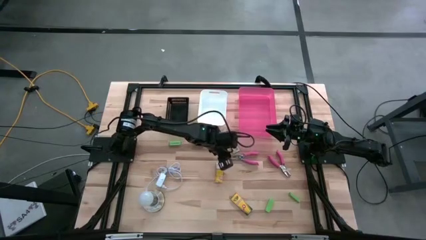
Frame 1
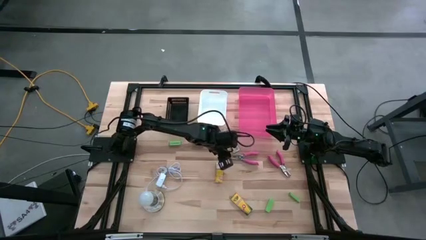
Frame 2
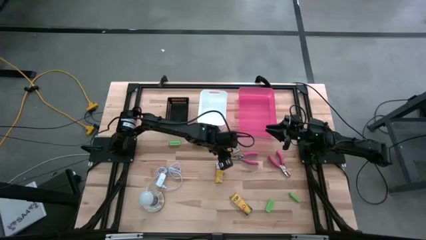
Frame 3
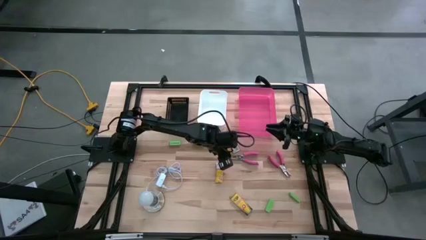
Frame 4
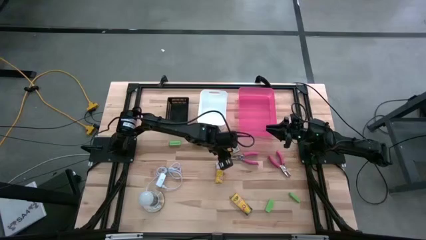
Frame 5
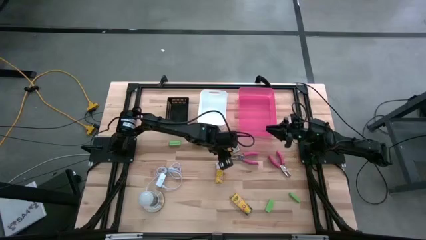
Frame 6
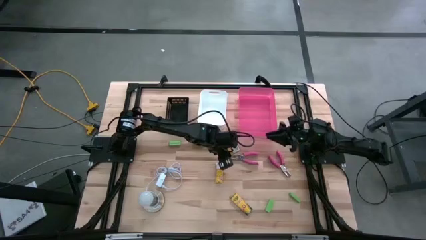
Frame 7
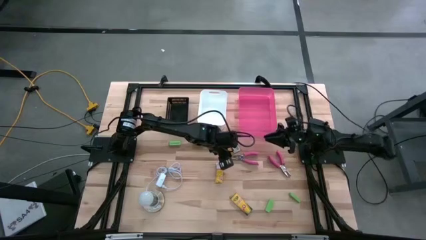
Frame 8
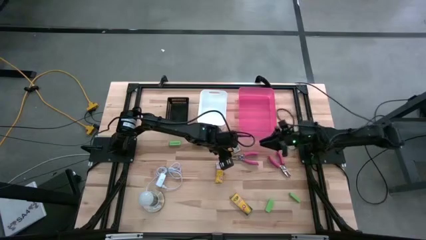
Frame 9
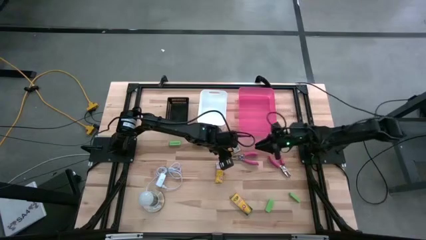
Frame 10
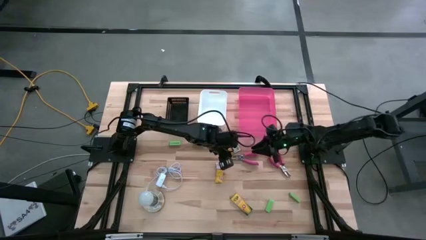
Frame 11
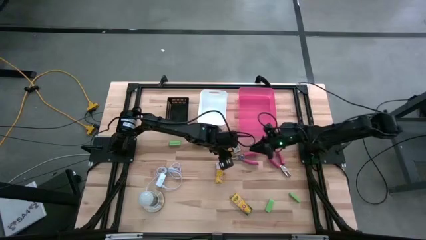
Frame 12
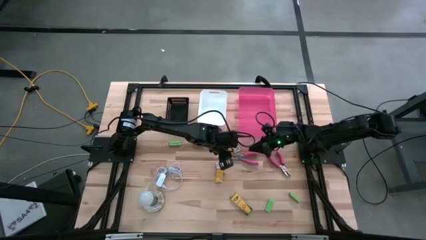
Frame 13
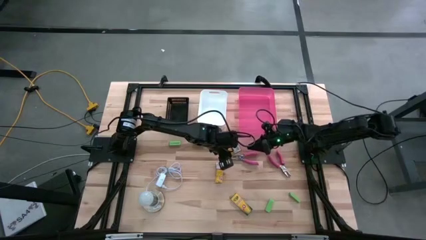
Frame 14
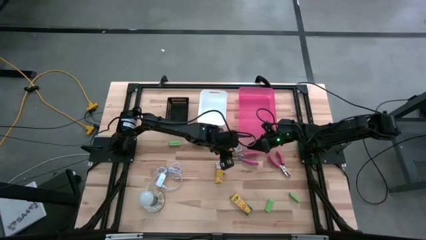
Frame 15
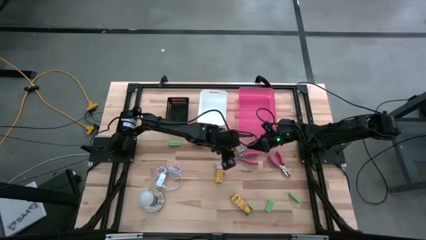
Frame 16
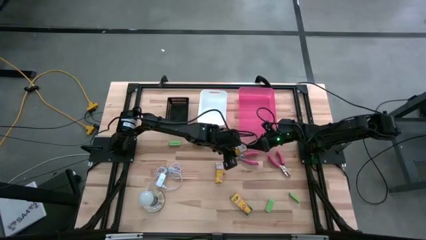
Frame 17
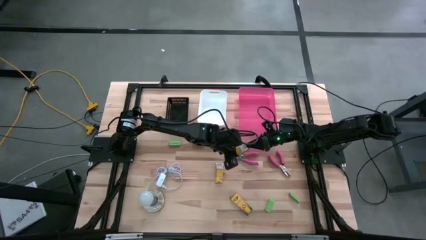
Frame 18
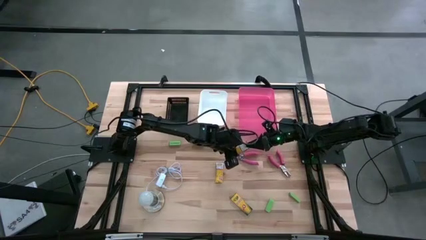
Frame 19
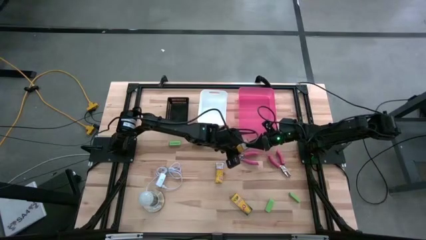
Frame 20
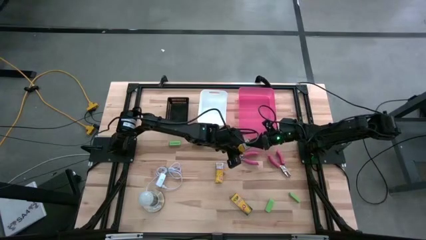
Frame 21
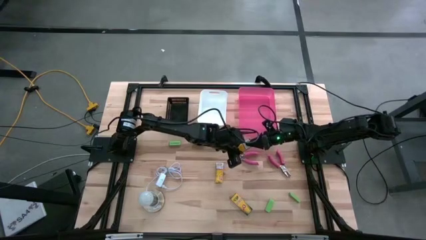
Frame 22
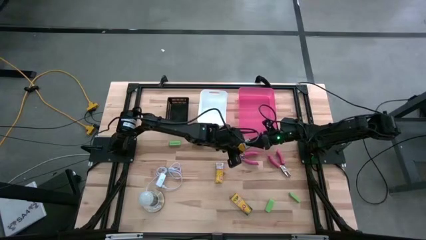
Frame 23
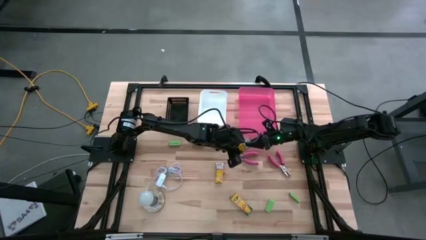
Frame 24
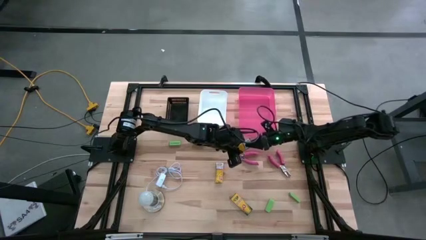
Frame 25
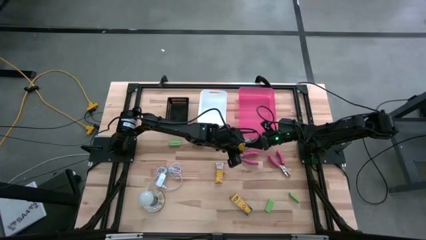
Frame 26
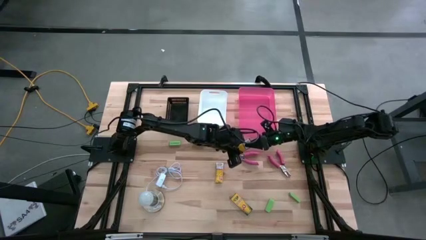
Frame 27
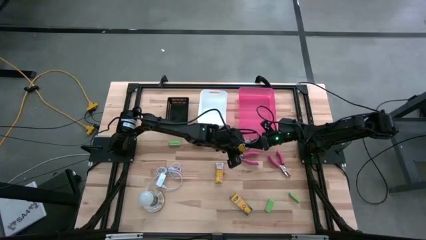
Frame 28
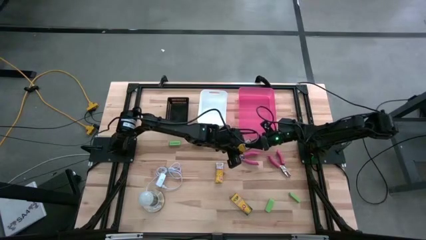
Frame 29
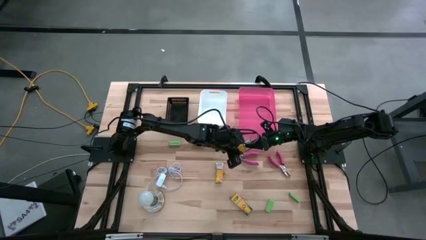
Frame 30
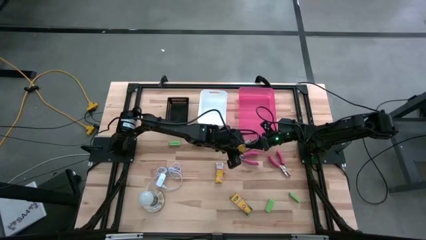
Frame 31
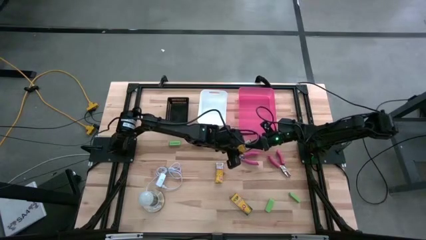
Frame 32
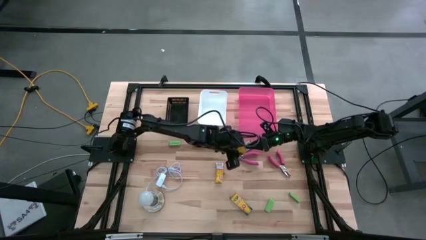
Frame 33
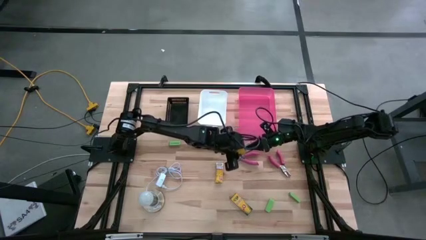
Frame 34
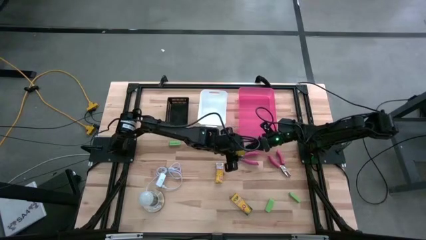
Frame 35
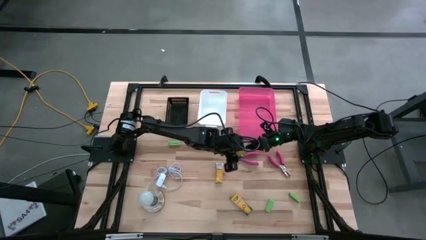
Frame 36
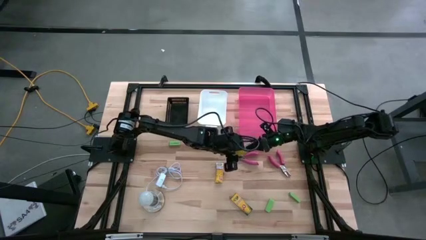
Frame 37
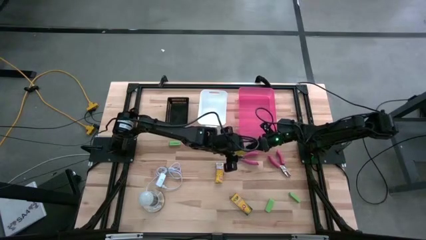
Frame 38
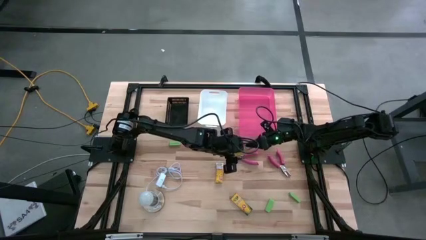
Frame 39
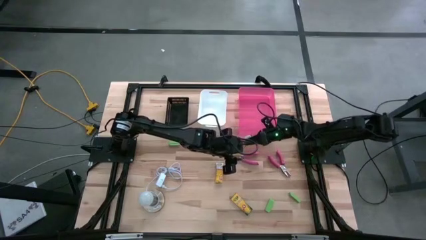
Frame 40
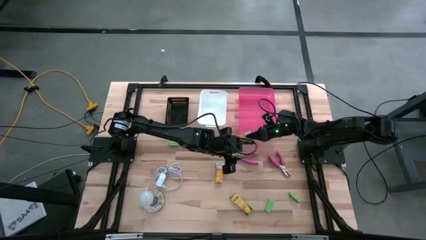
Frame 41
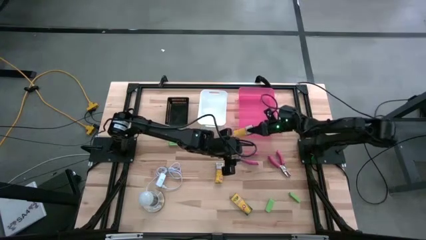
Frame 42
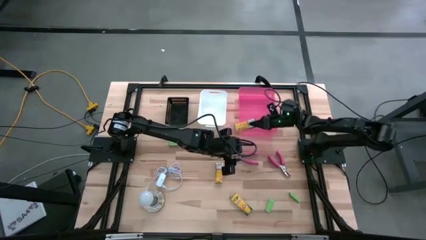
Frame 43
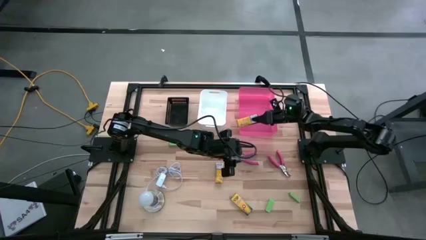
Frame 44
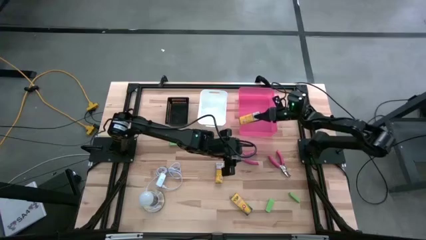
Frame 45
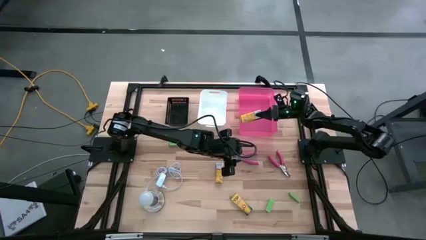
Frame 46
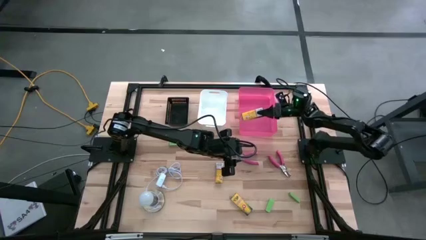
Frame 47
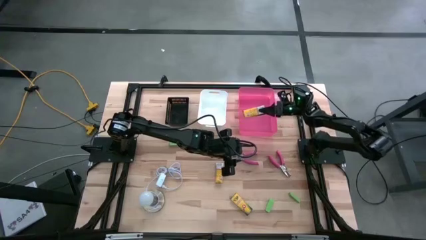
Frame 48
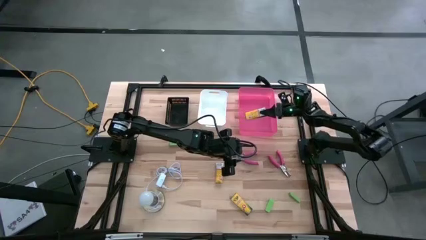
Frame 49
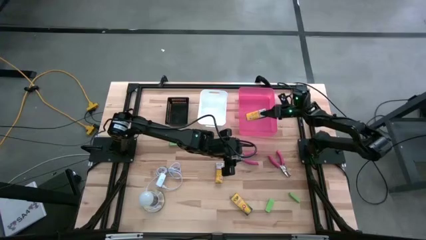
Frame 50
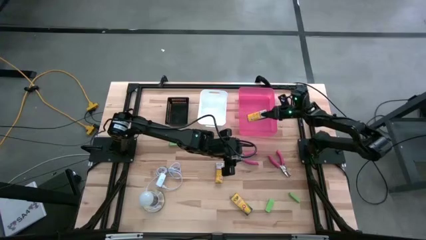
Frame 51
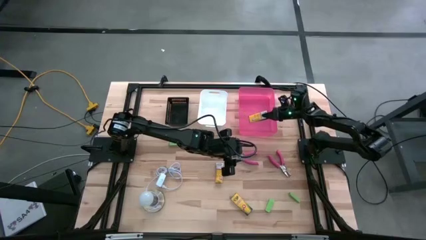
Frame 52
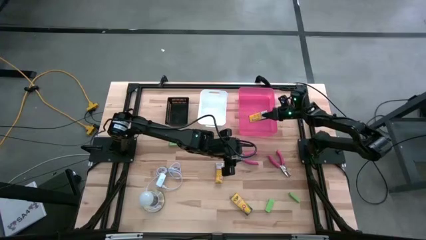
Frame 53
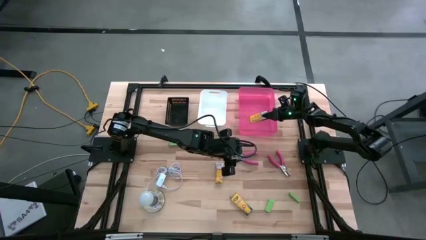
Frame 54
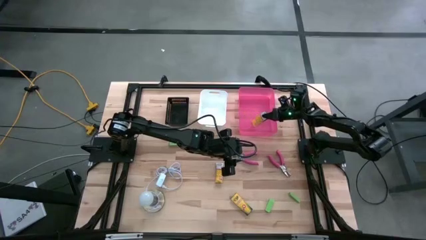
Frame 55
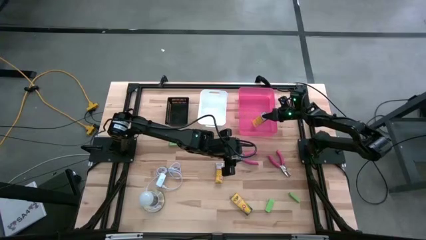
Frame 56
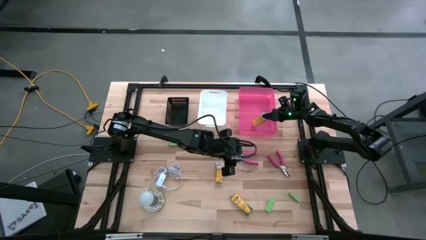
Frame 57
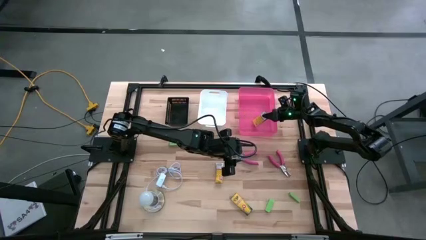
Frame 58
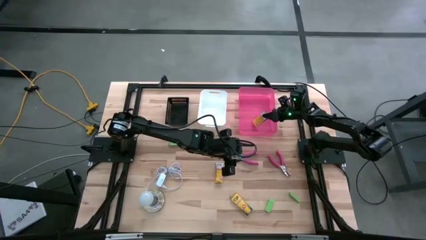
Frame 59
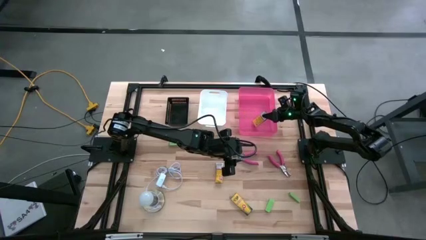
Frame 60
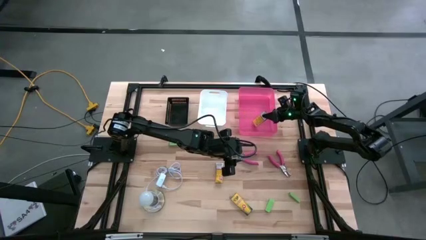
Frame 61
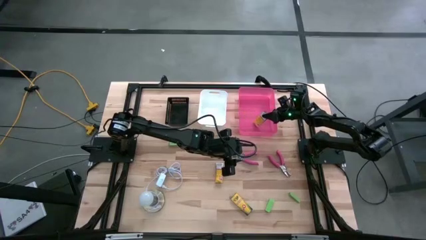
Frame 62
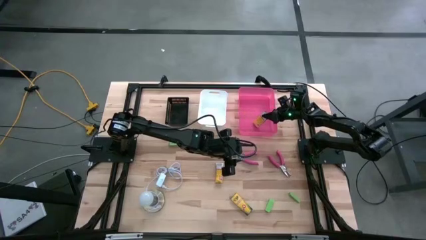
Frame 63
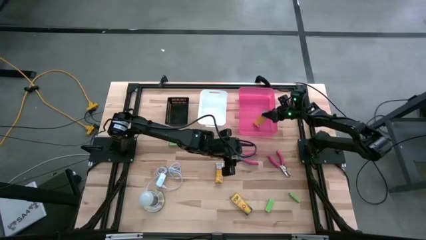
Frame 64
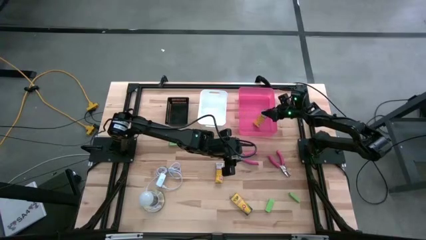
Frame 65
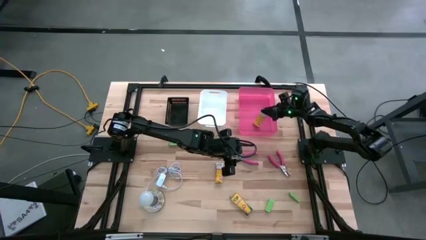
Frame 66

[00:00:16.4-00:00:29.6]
Task: Pick & Place School Supplies
Put the left crayon box into the pink bin
